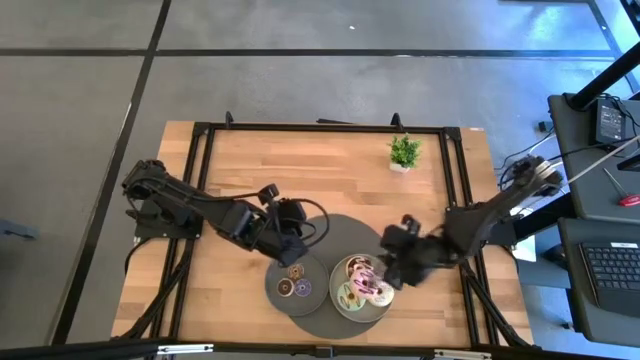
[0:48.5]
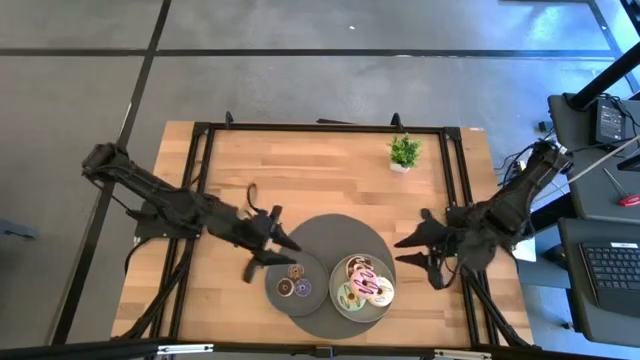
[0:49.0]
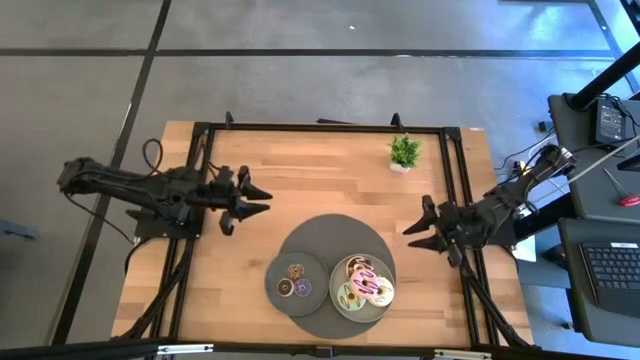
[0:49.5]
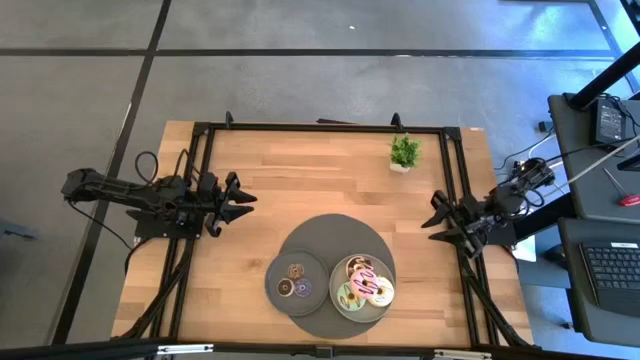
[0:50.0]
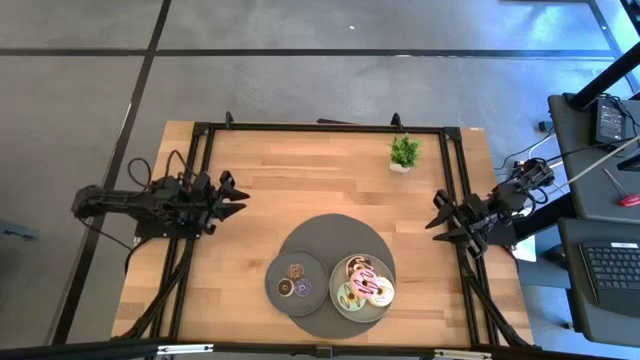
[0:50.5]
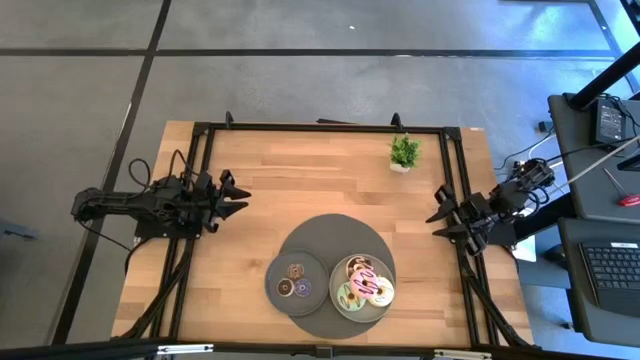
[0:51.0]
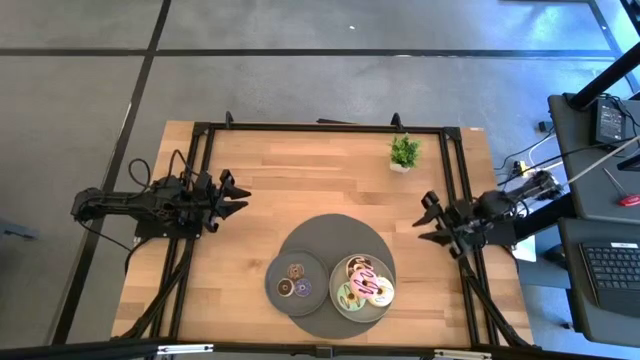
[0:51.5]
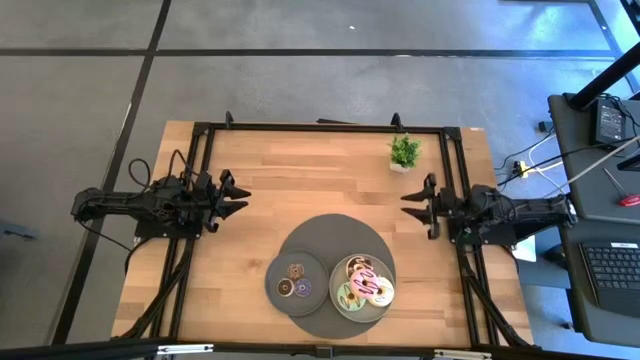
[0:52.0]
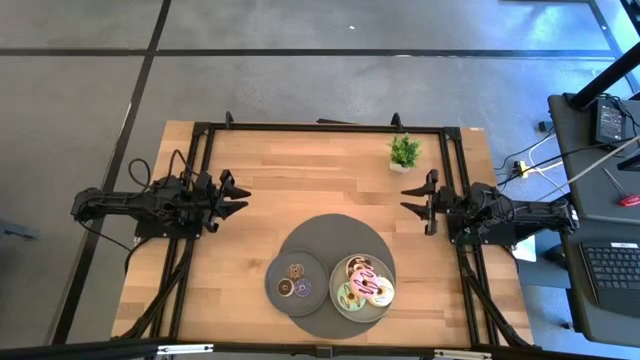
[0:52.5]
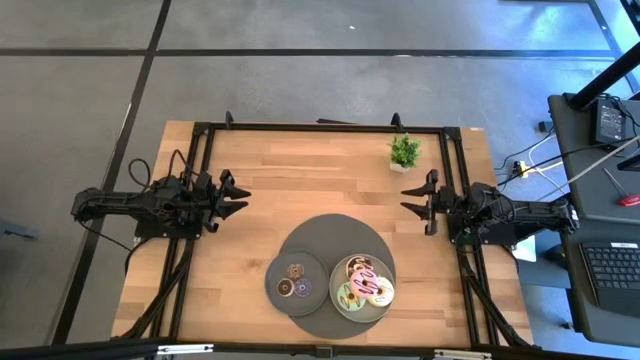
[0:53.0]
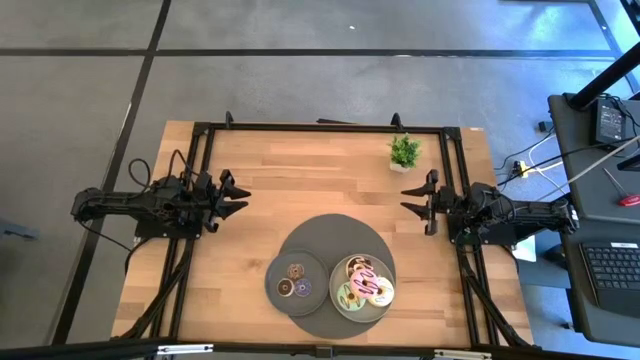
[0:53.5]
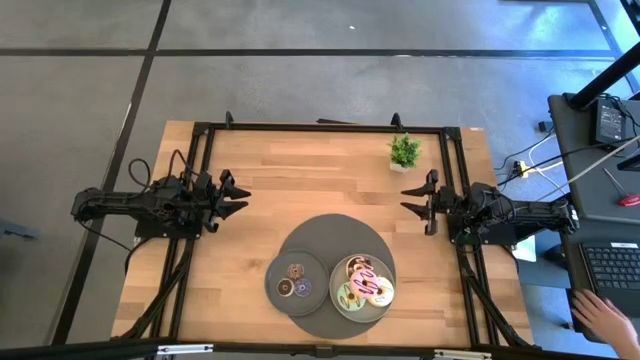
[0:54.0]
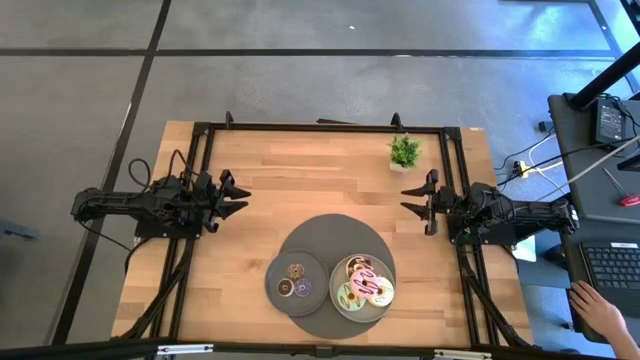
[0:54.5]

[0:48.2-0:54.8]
Task: Pick & Place donuts
Return to Home Position

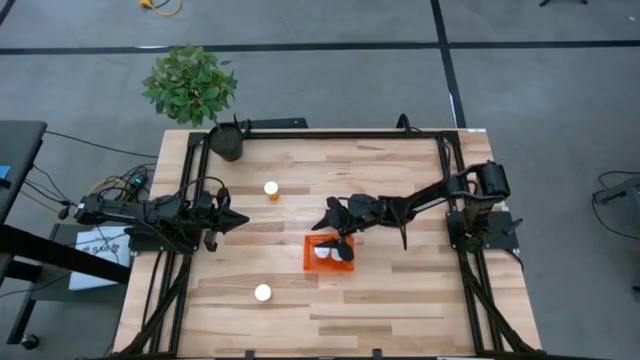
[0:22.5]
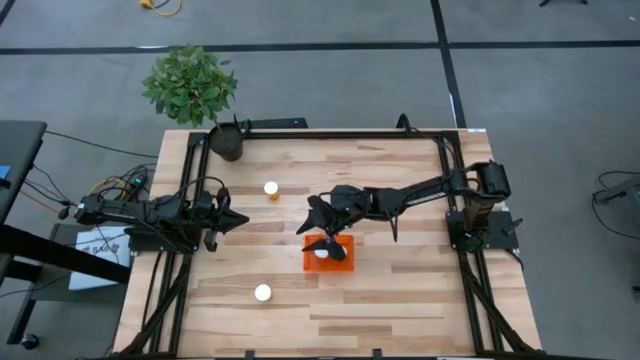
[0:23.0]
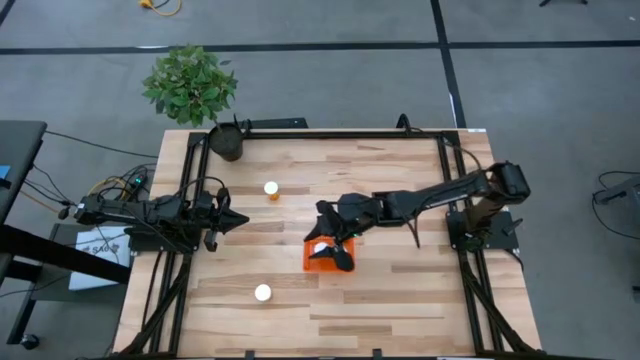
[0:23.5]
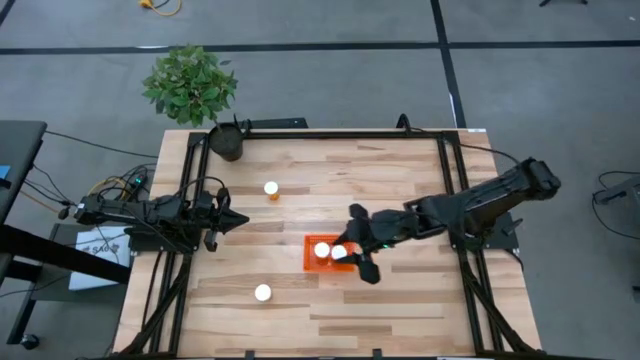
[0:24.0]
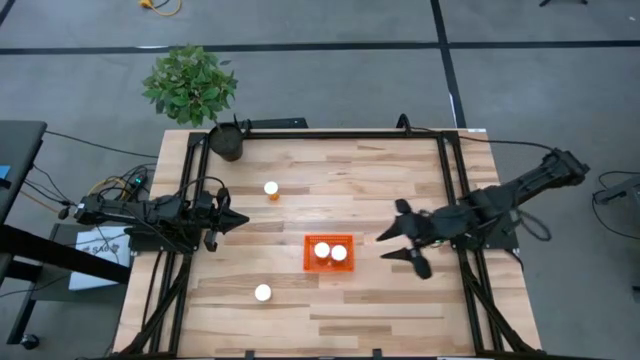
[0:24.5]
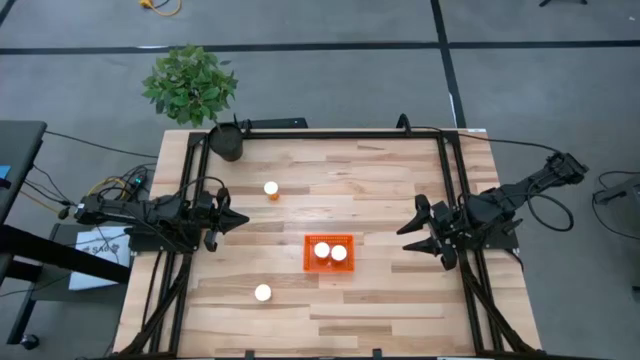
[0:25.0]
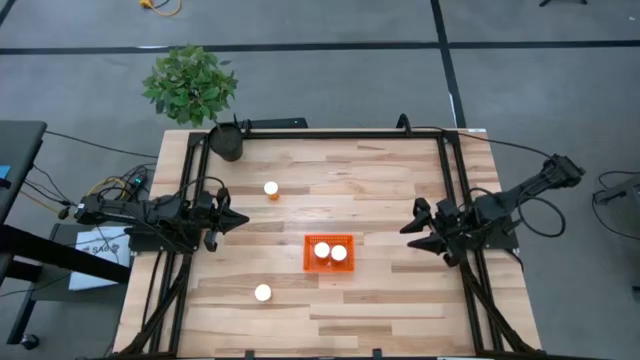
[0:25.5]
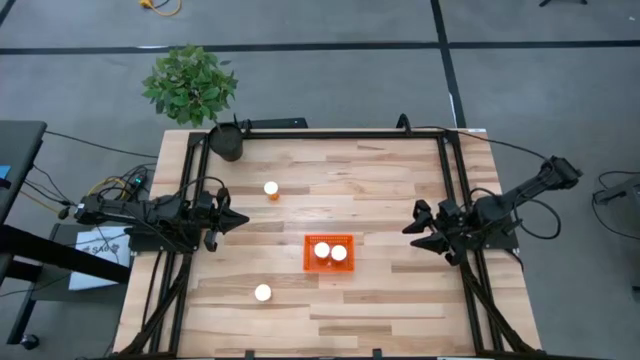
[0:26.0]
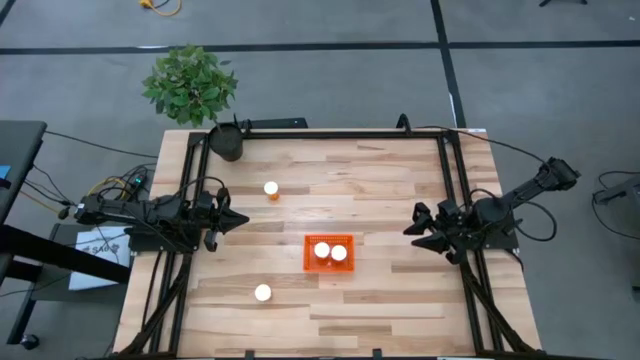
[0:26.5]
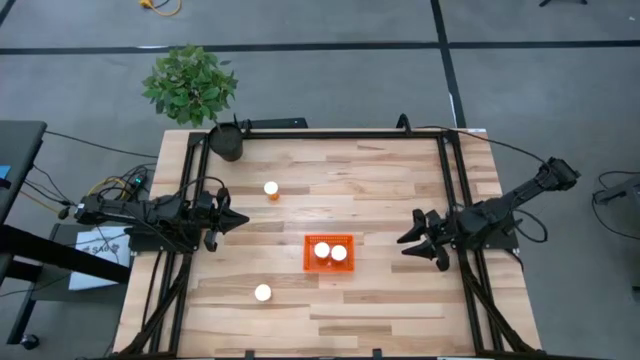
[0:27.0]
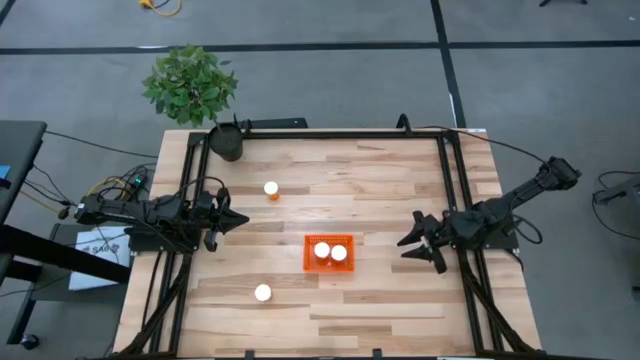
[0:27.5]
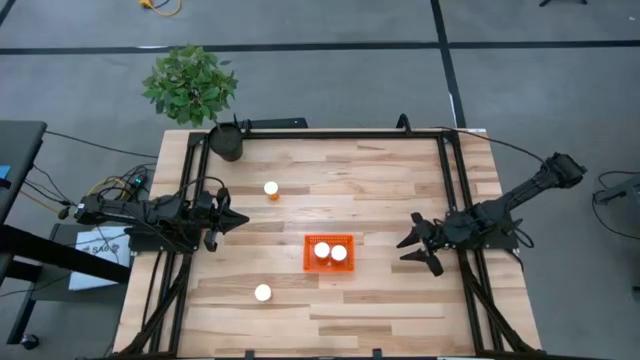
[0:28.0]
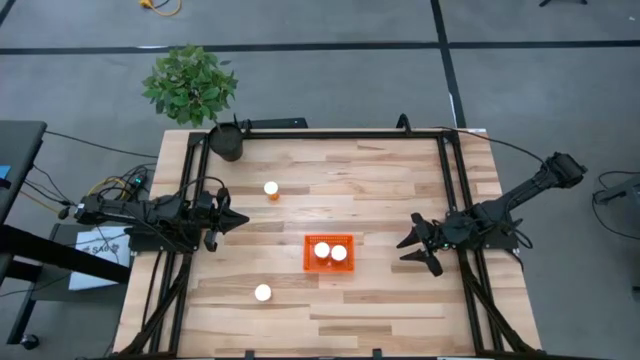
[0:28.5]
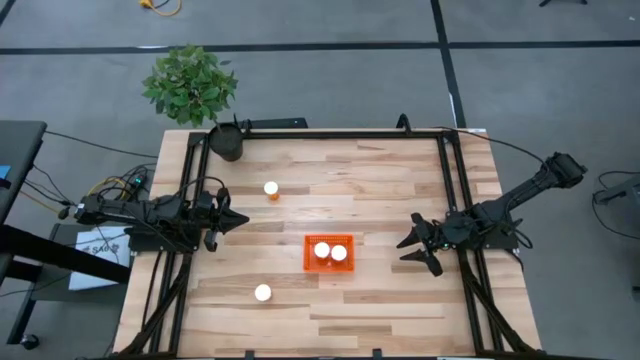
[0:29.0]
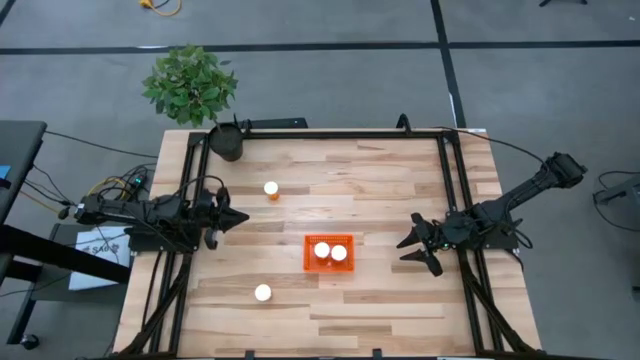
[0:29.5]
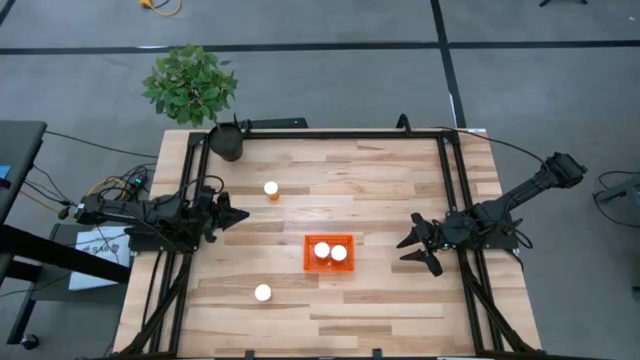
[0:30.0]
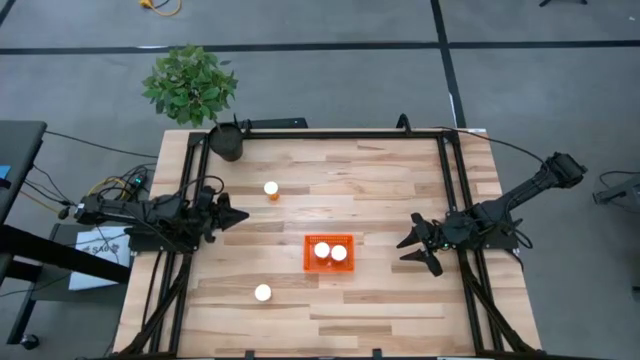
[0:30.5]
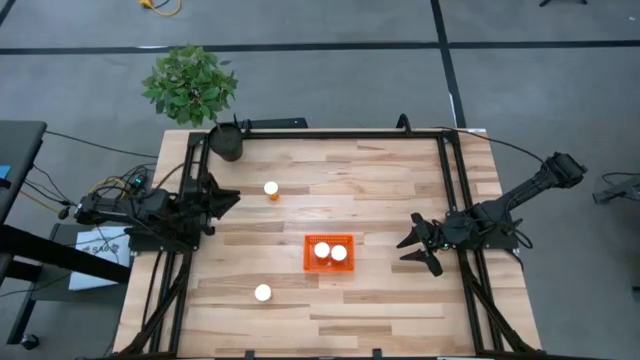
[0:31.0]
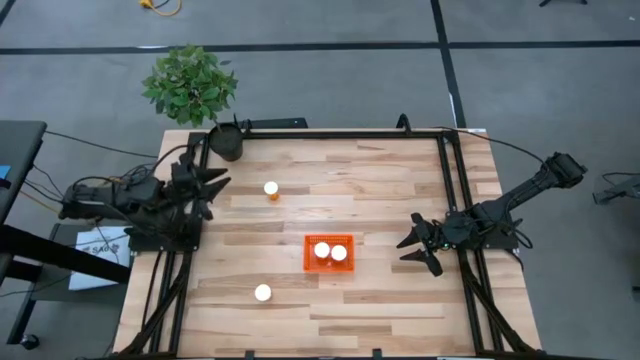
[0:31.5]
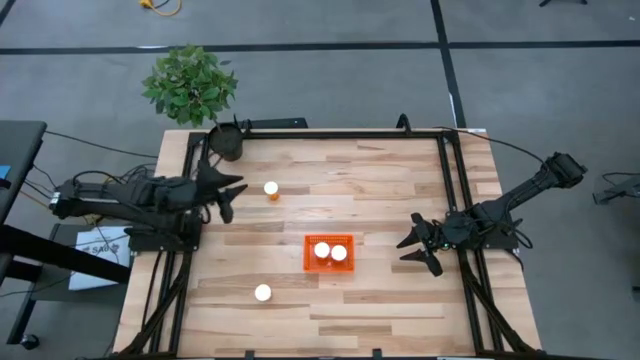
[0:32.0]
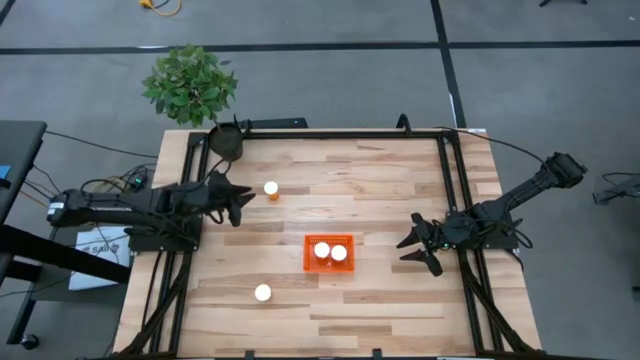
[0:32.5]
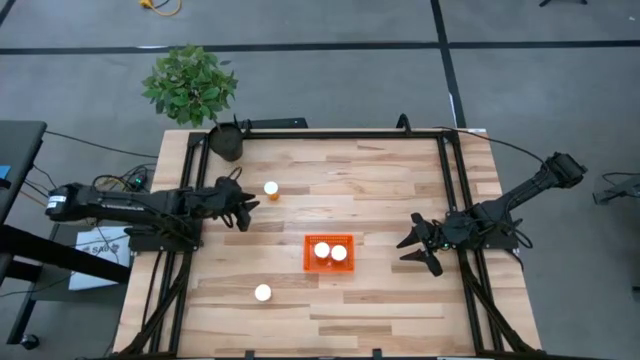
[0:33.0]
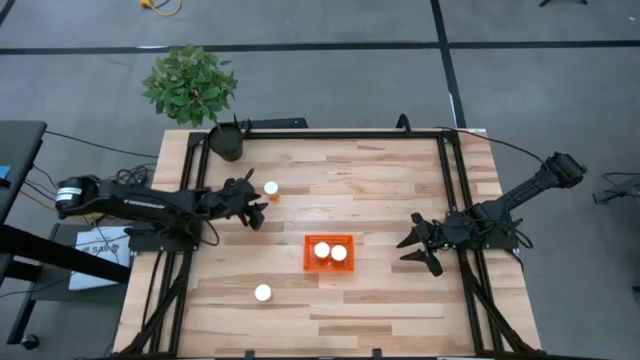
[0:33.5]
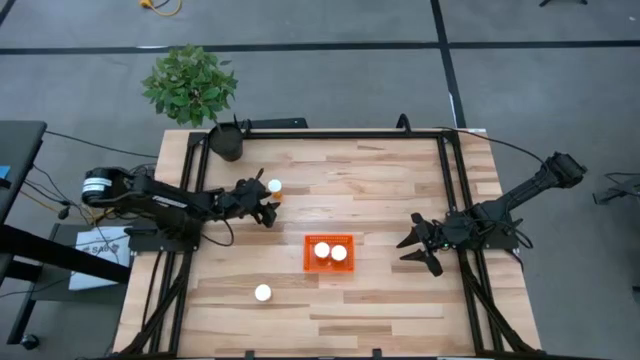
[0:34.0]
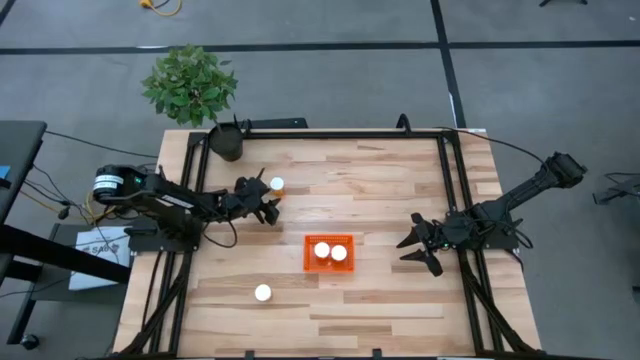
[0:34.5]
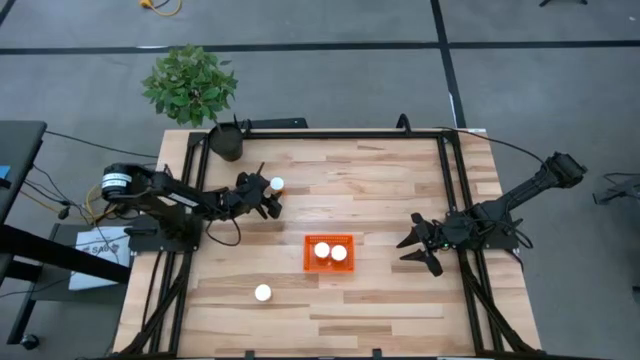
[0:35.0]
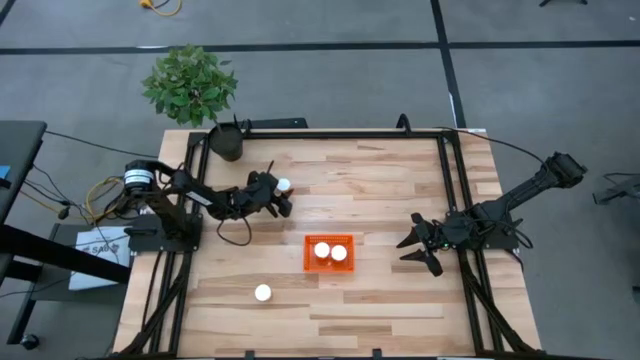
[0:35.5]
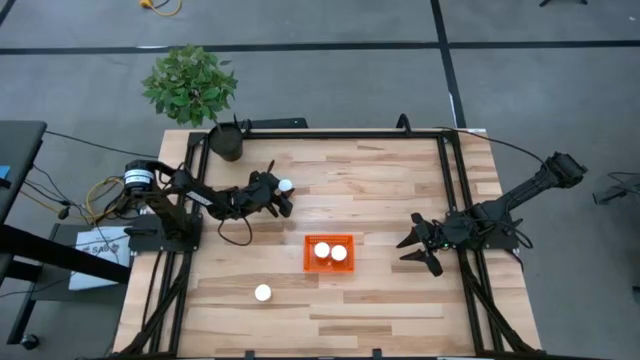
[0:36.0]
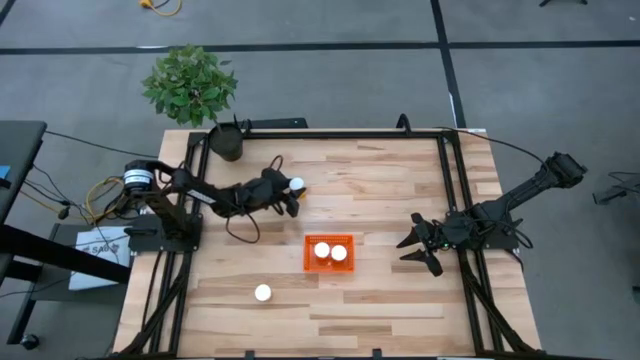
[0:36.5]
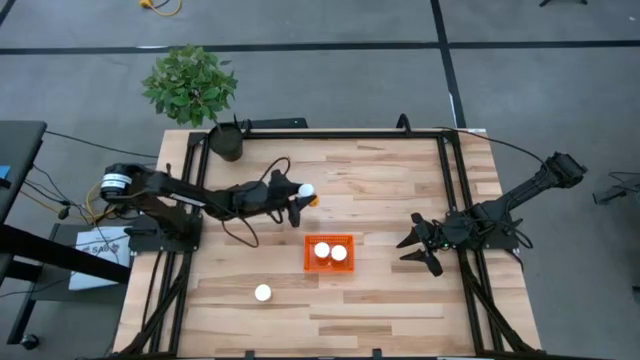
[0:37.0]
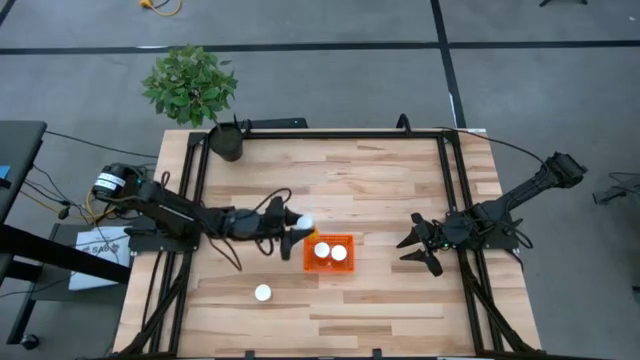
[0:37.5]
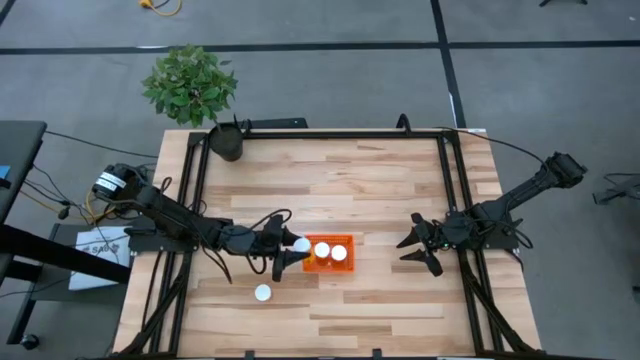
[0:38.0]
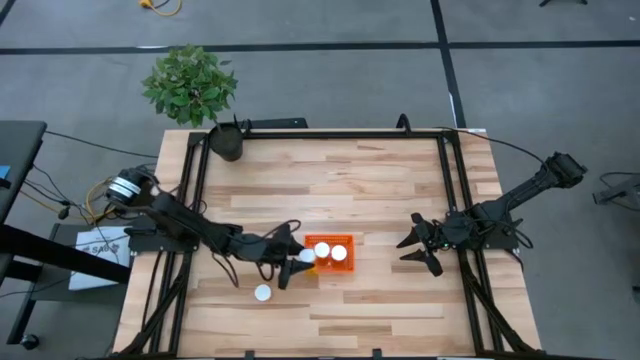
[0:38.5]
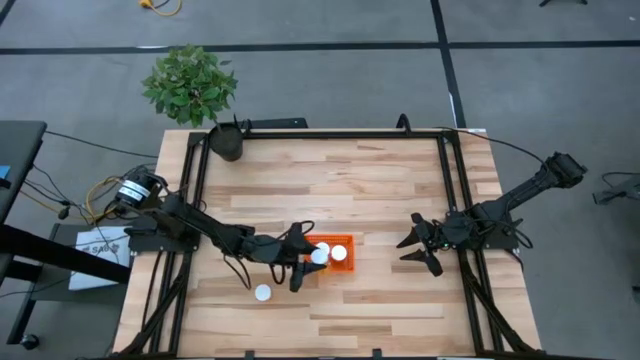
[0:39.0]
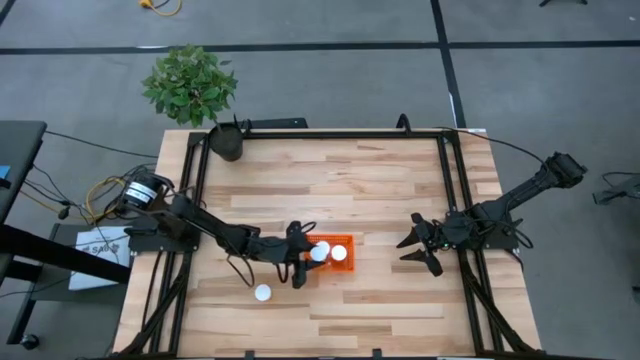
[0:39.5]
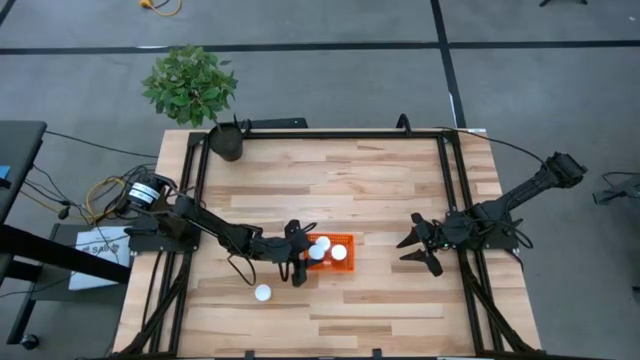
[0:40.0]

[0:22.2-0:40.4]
Task: Pick and place pill bottles into a basket
Put the orange pill bottle into the orange bin
